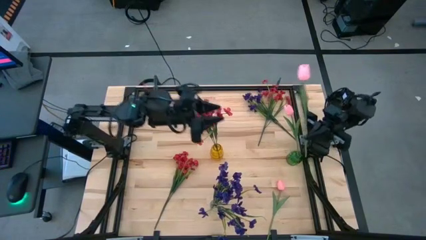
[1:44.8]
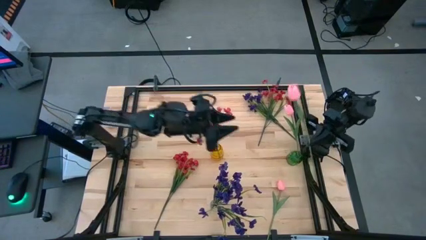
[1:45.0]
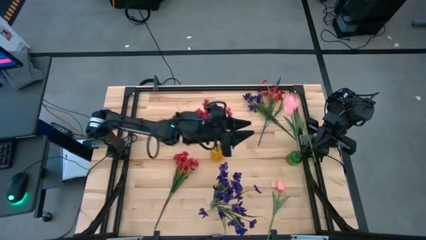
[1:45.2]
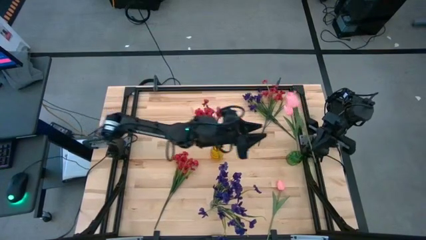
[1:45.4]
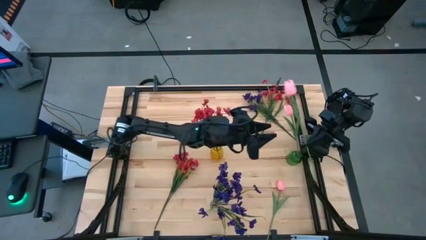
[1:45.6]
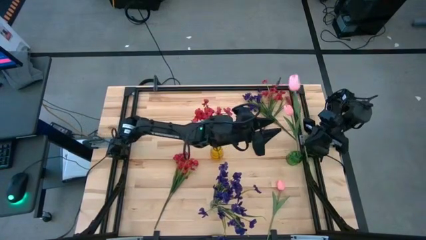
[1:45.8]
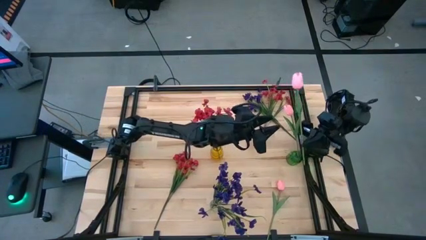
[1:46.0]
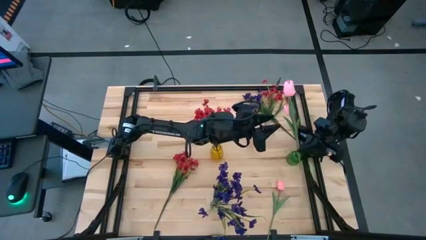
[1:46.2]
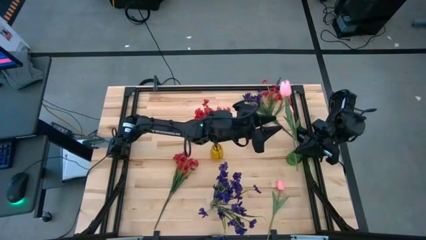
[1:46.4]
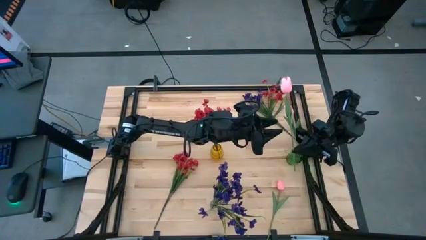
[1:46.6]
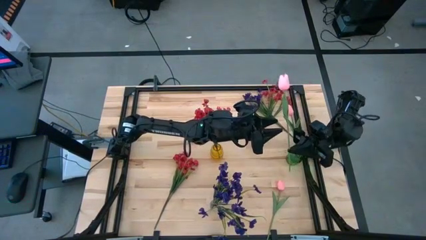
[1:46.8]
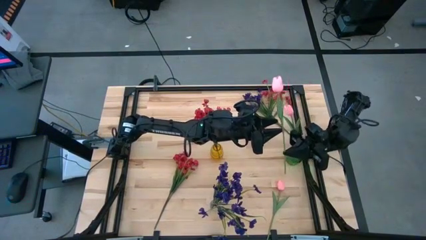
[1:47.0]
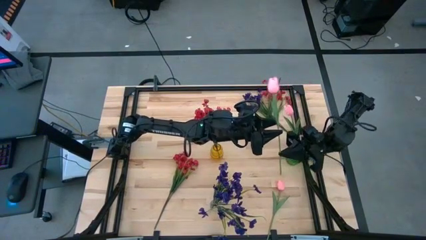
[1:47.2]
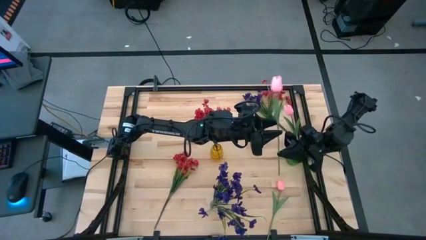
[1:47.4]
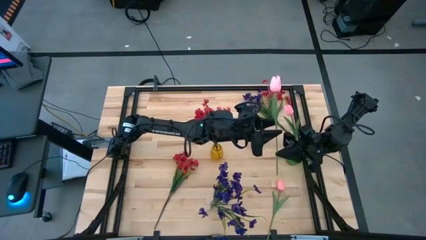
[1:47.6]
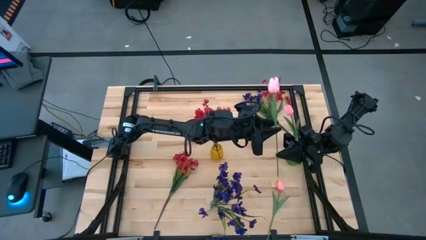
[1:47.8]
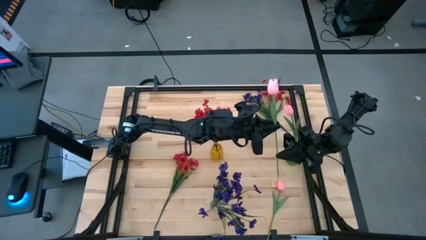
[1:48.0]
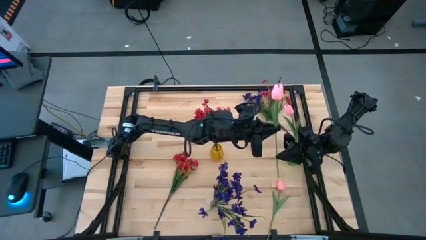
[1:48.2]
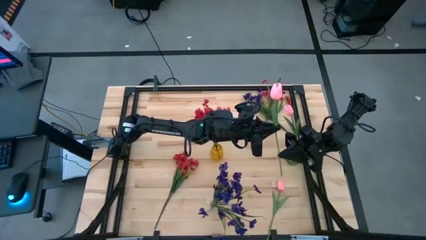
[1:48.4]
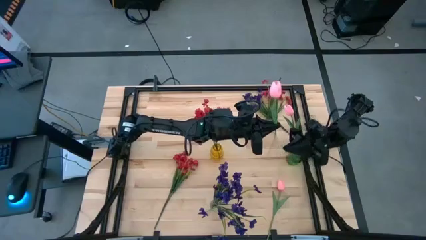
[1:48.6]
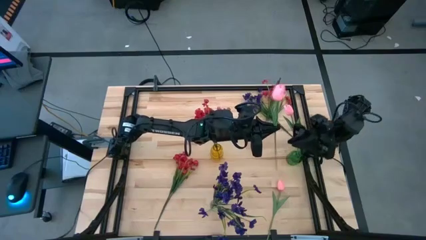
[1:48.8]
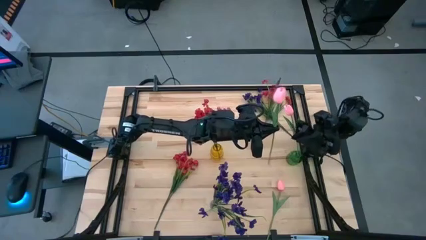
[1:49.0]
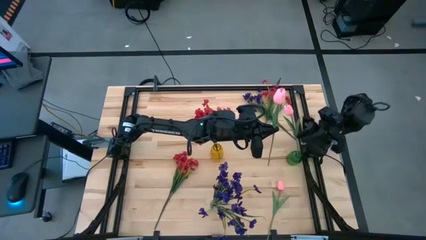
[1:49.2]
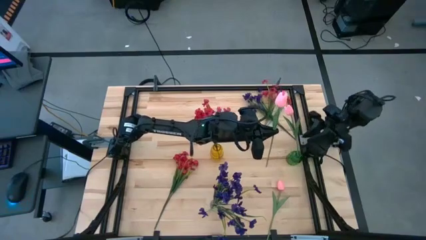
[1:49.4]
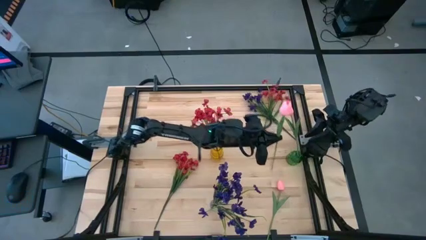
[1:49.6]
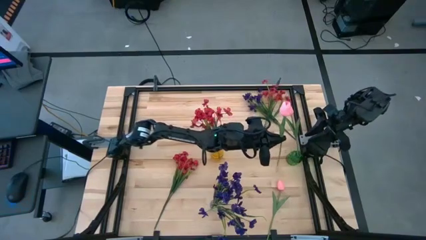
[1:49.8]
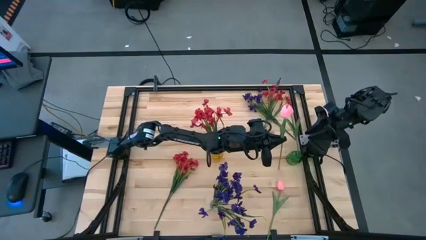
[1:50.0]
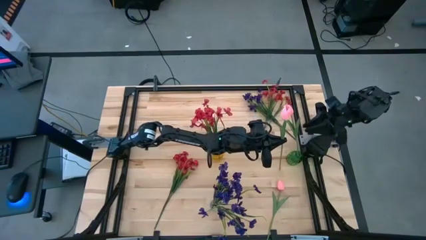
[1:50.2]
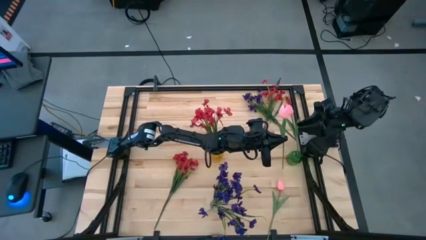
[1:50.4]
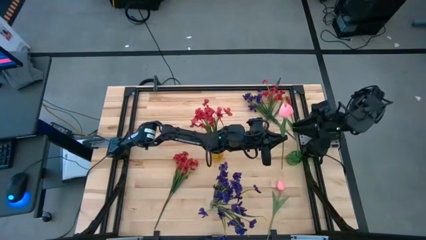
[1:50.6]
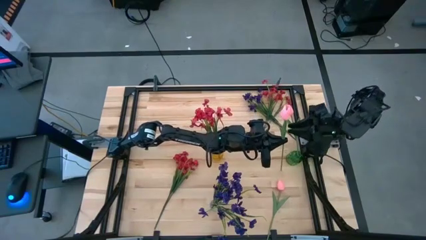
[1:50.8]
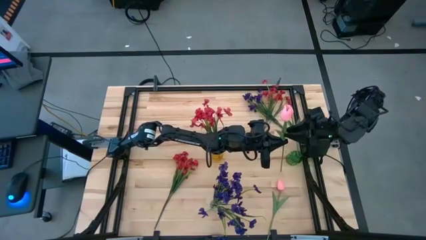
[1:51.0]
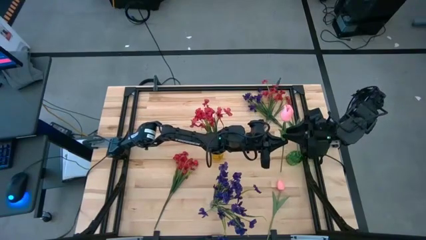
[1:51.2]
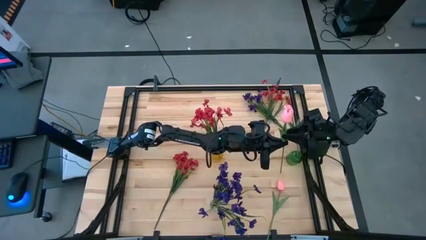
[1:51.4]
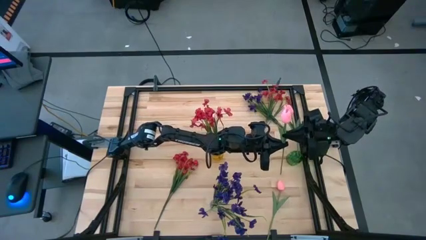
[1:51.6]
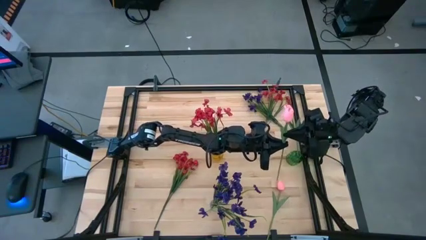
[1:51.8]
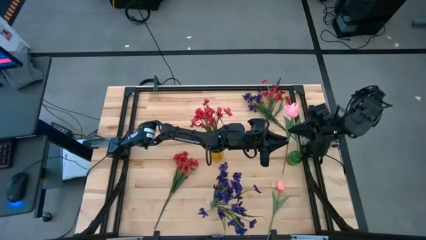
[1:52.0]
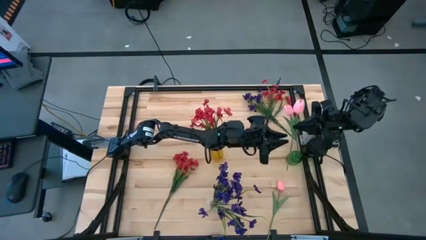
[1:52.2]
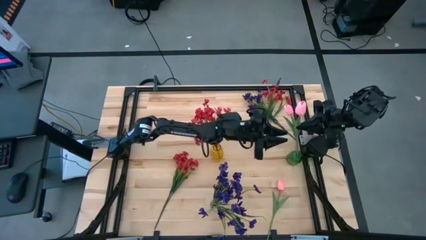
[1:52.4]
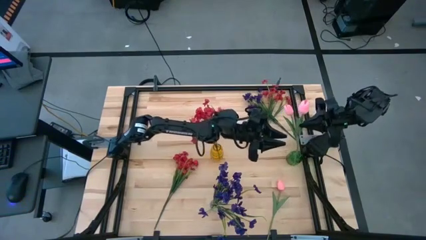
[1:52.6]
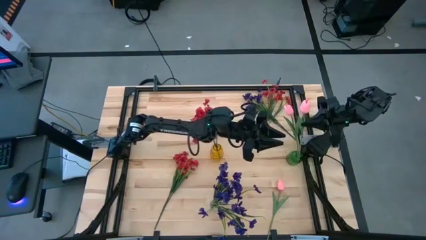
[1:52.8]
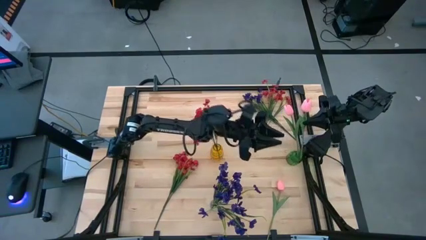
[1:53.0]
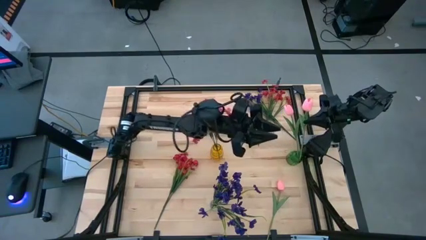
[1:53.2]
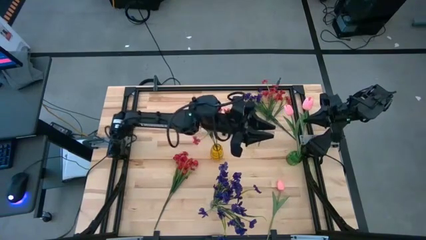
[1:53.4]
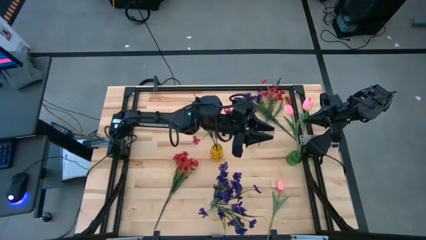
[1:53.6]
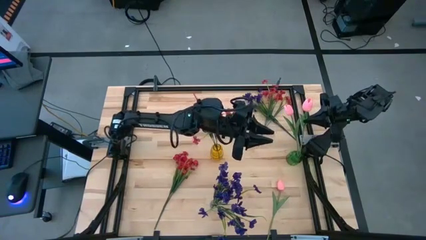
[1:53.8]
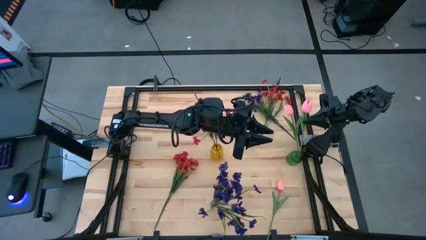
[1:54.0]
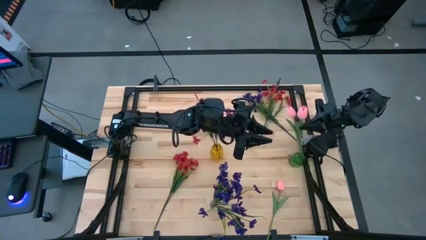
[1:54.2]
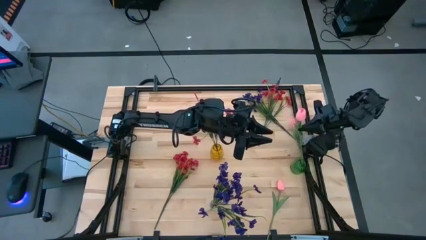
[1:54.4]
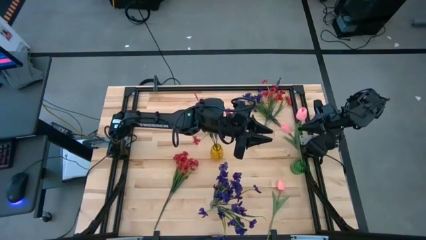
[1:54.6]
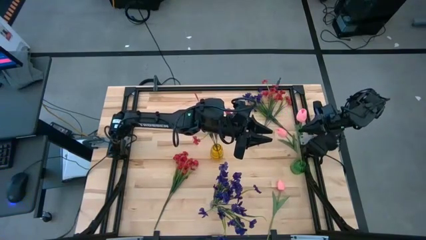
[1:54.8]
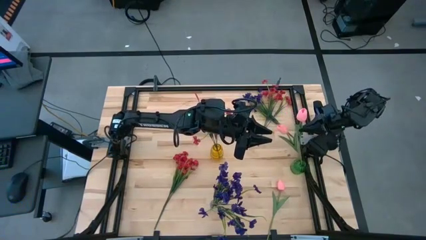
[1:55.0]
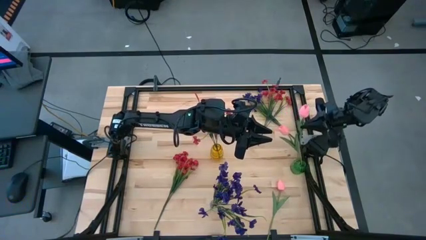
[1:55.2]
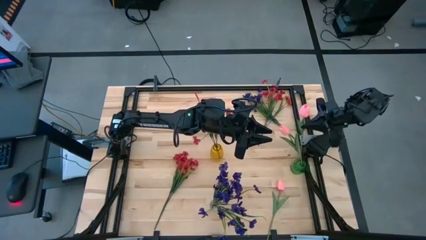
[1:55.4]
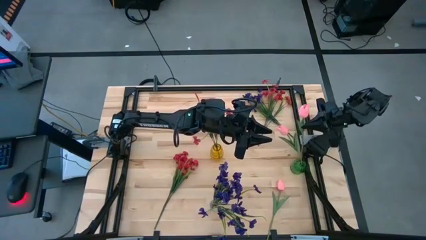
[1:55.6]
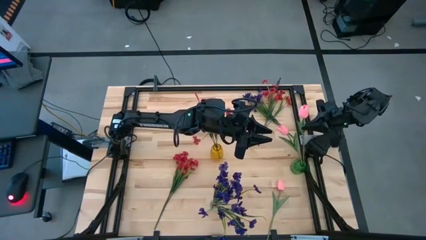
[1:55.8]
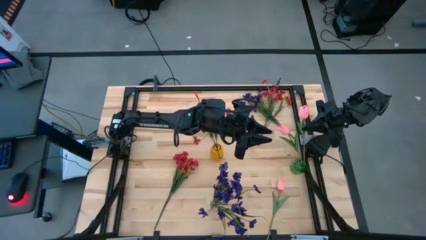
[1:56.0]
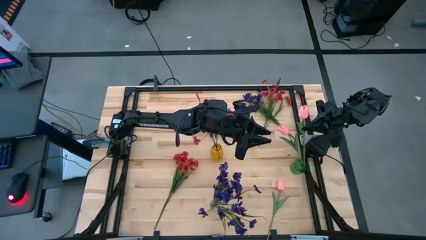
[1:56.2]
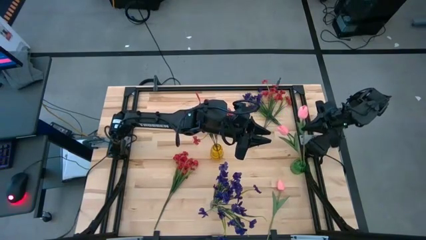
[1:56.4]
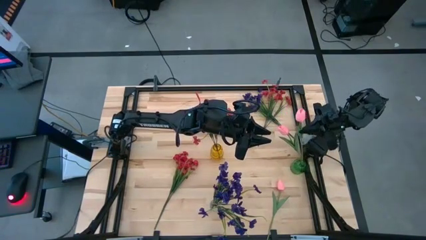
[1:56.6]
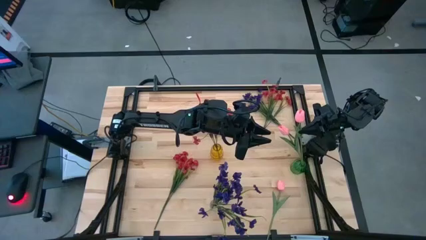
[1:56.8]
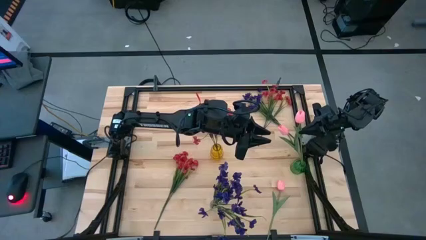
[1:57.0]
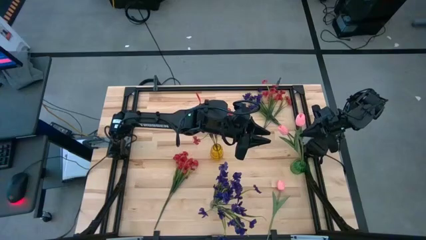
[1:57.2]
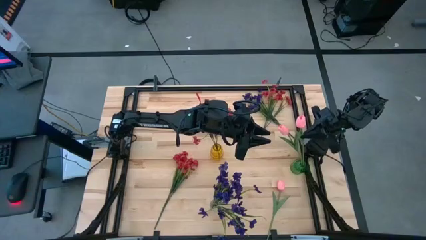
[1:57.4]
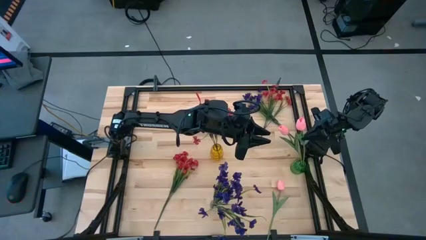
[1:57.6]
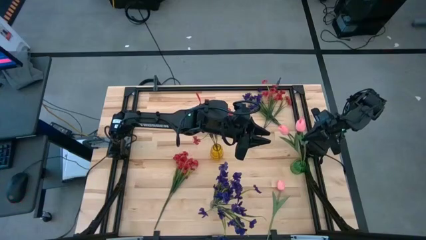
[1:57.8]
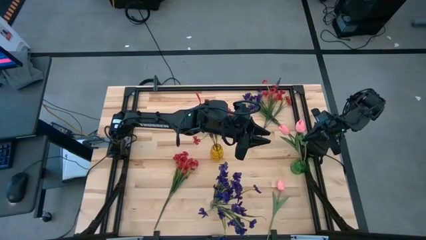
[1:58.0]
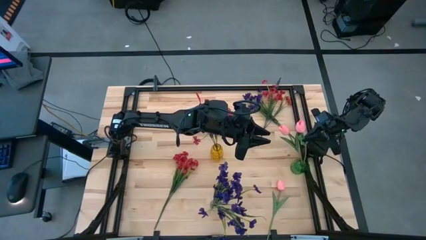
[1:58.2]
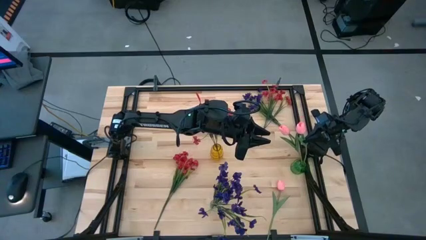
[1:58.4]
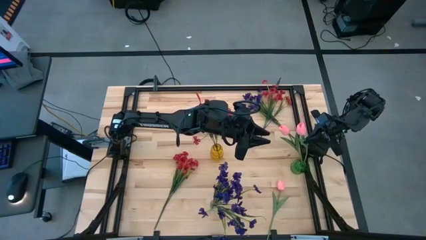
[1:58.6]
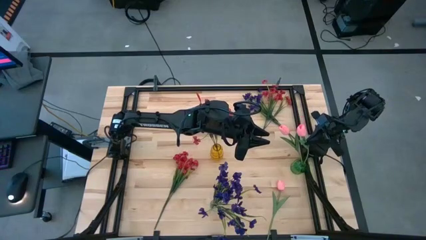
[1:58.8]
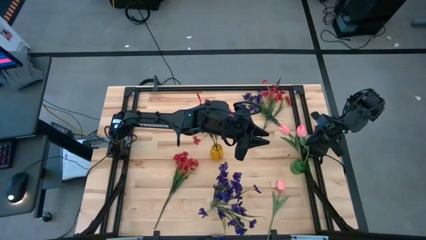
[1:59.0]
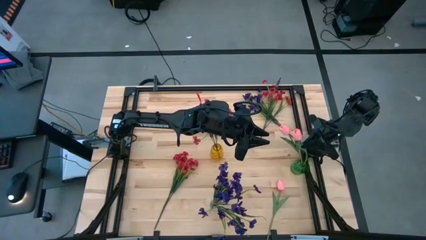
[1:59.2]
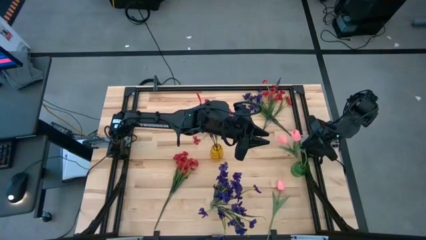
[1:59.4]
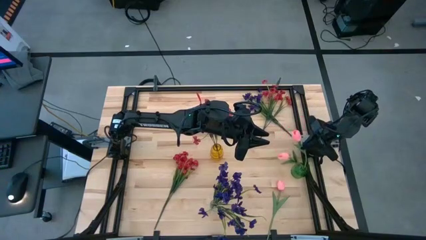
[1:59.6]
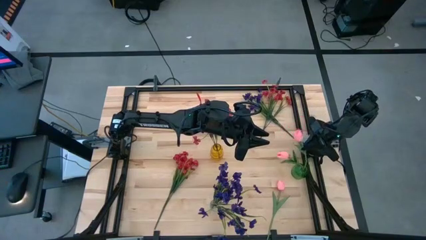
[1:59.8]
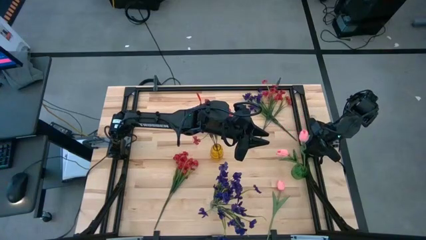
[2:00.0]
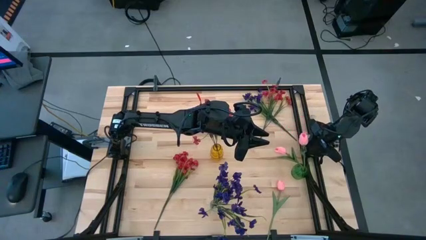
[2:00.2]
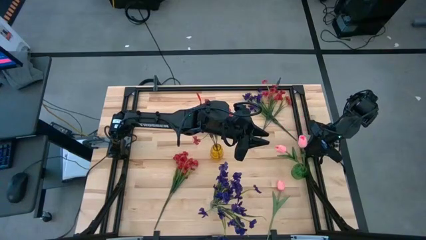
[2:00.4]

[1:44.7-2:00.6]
Task: Sort flowers into vase by color
Put the bottom left pink tulip into the green vase
